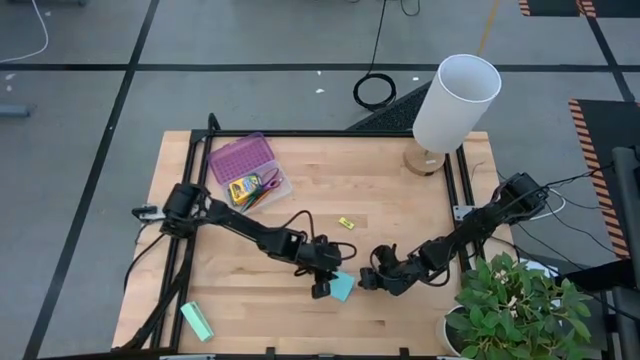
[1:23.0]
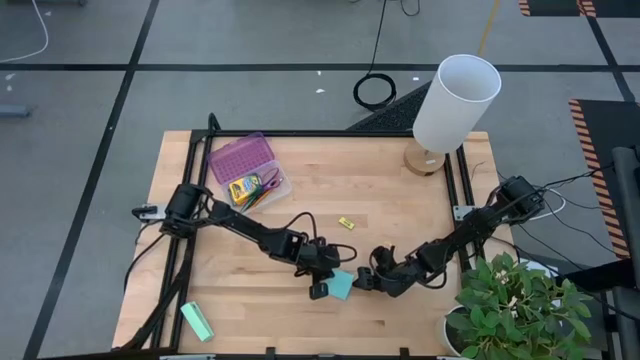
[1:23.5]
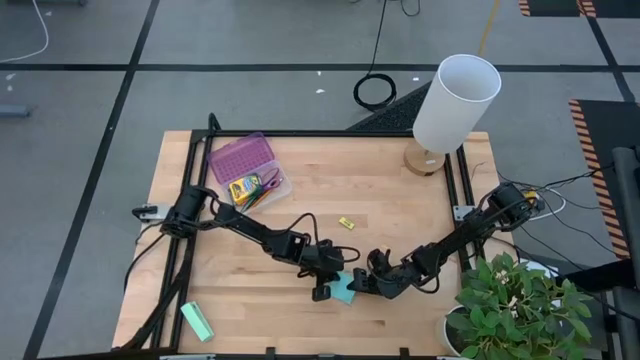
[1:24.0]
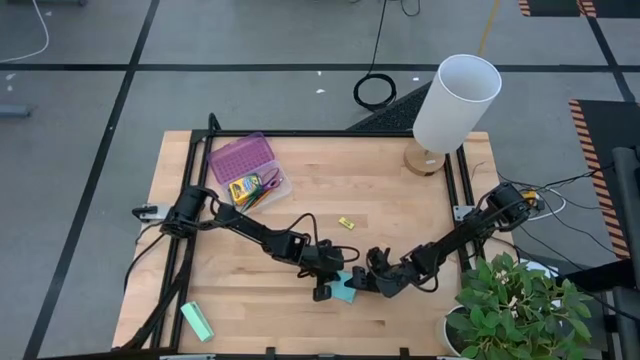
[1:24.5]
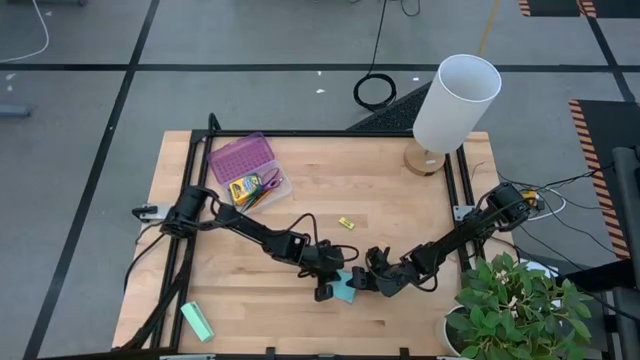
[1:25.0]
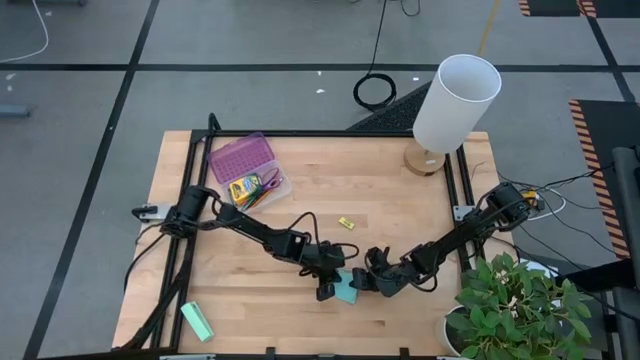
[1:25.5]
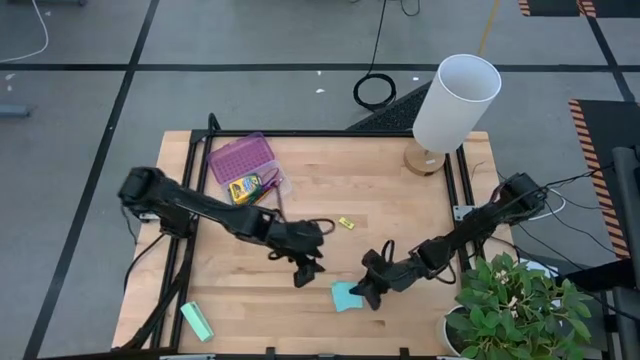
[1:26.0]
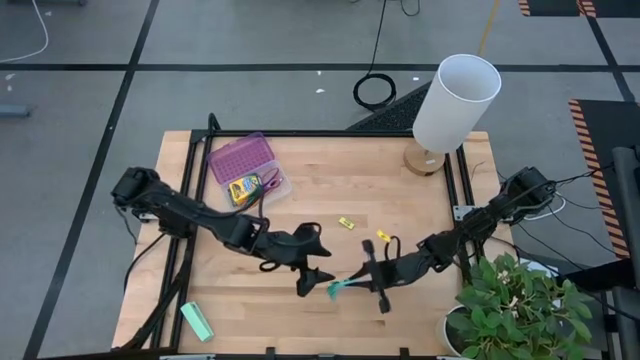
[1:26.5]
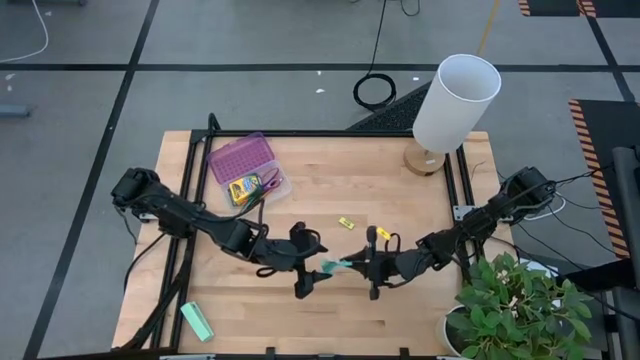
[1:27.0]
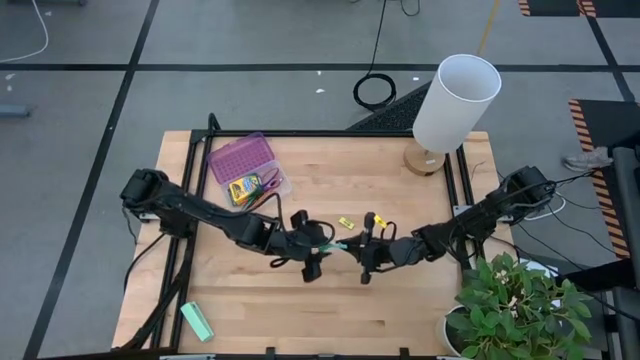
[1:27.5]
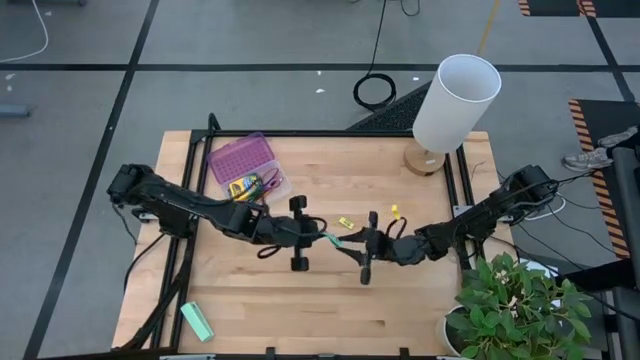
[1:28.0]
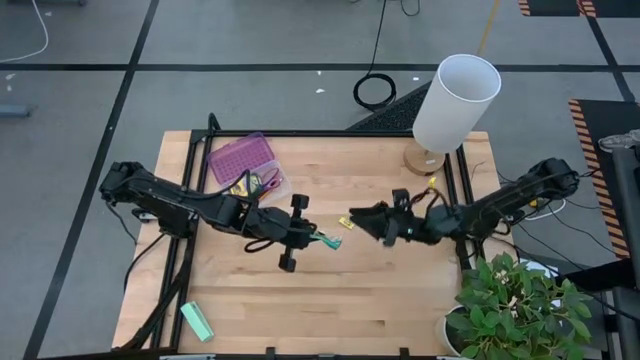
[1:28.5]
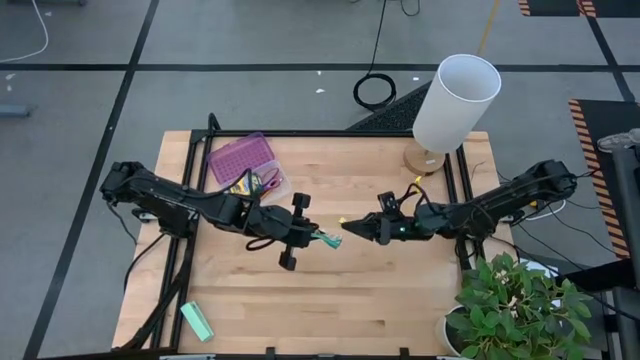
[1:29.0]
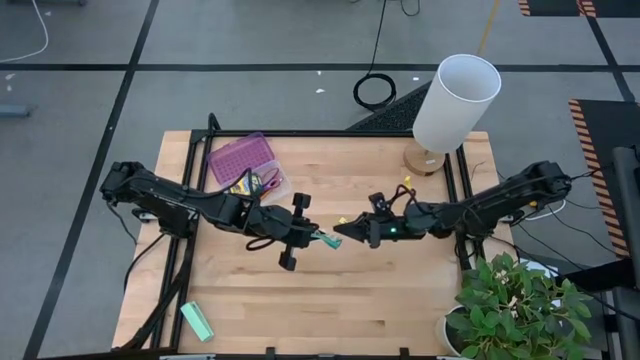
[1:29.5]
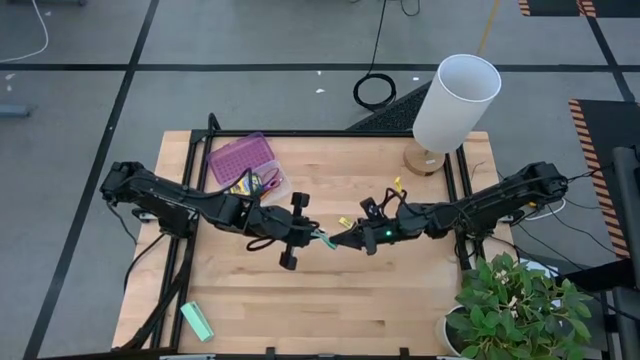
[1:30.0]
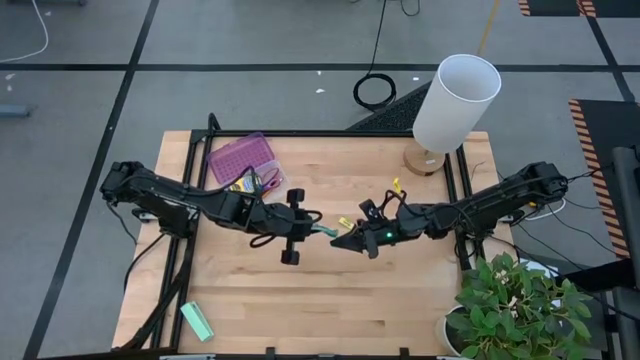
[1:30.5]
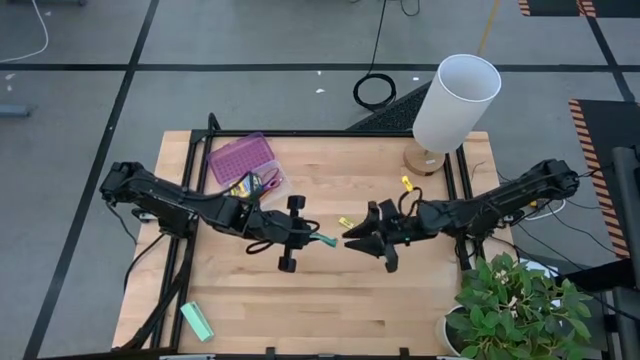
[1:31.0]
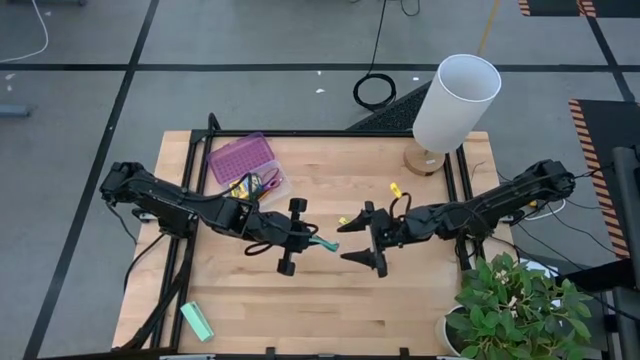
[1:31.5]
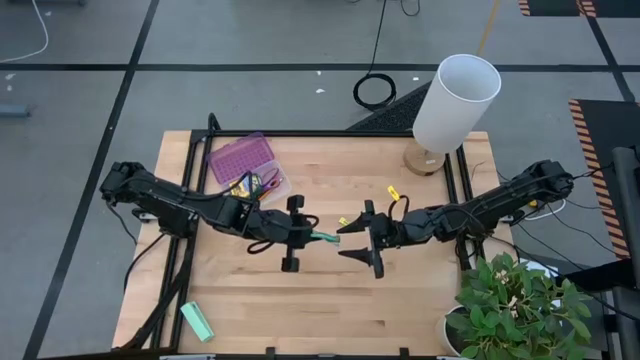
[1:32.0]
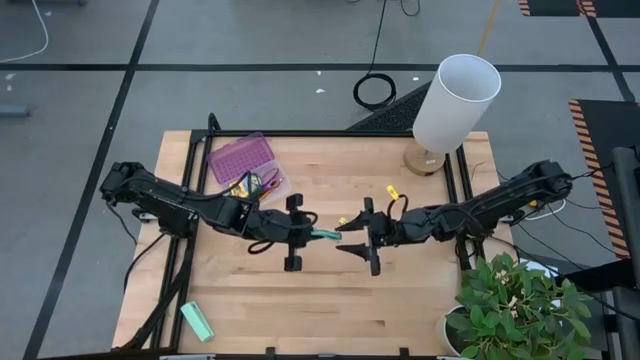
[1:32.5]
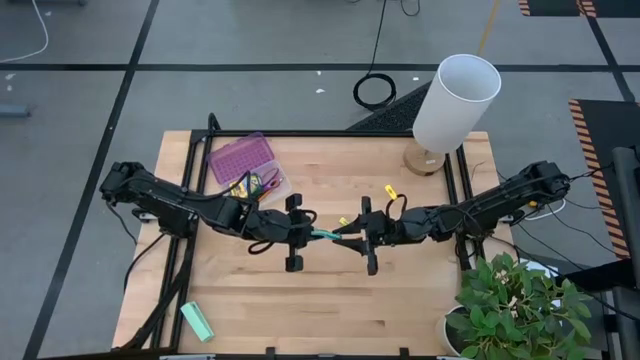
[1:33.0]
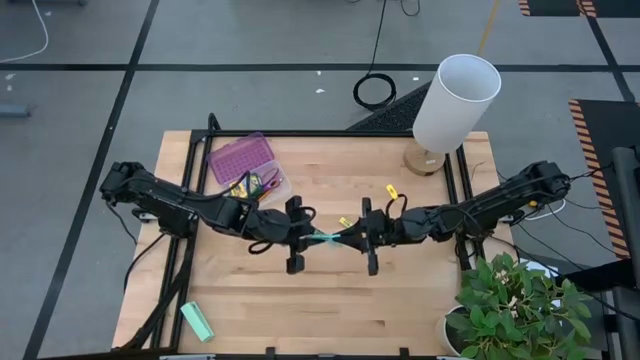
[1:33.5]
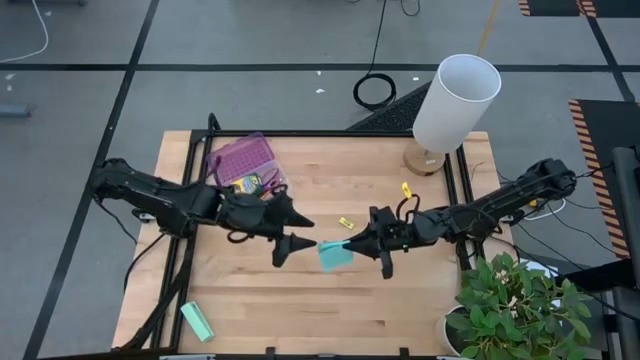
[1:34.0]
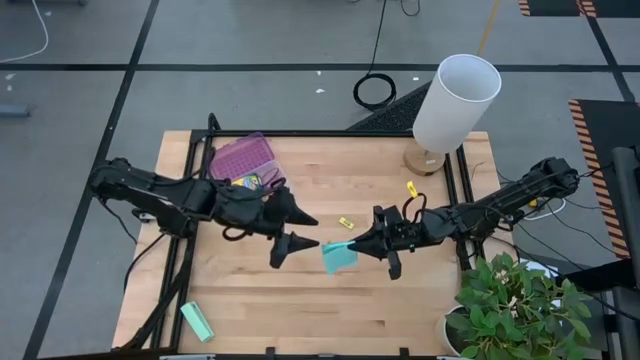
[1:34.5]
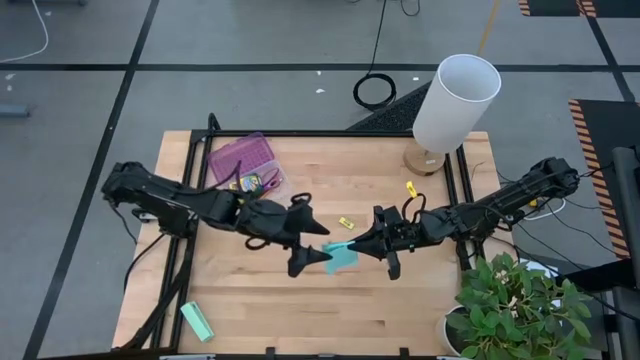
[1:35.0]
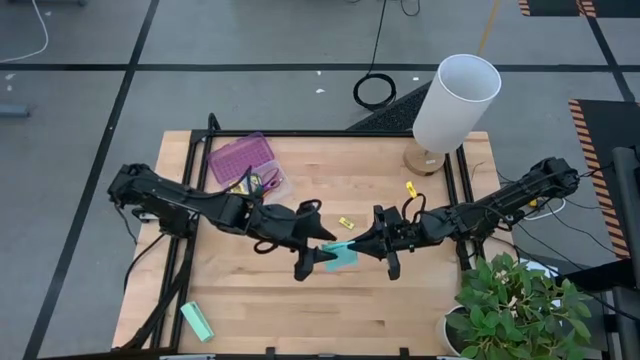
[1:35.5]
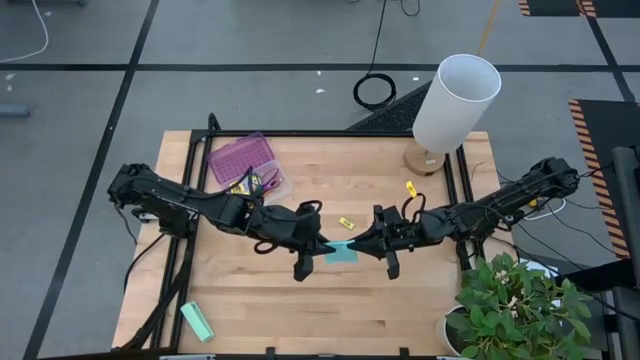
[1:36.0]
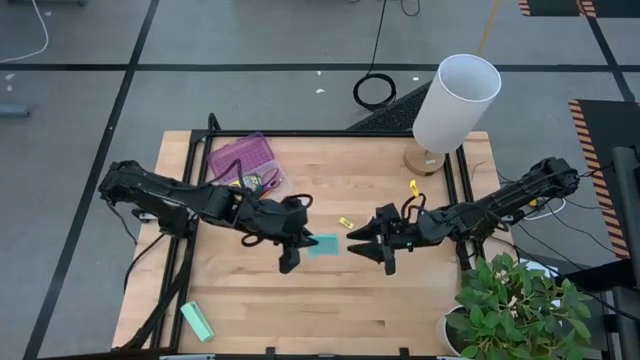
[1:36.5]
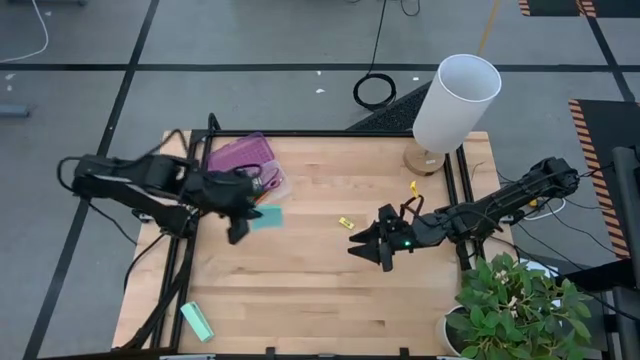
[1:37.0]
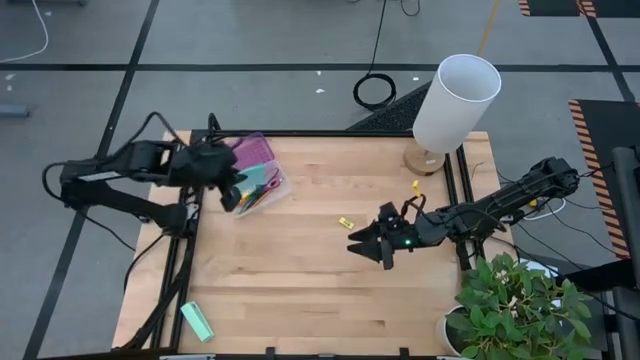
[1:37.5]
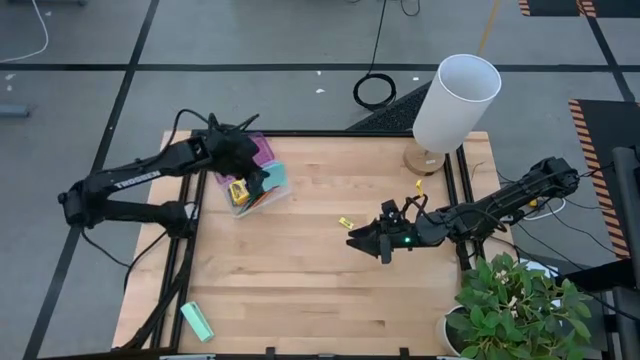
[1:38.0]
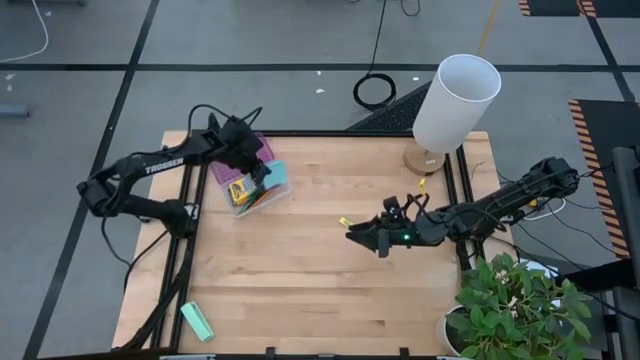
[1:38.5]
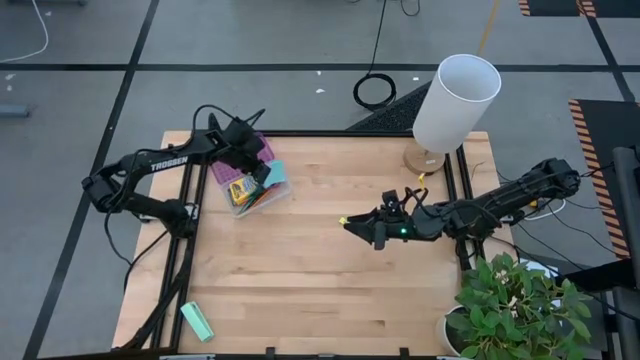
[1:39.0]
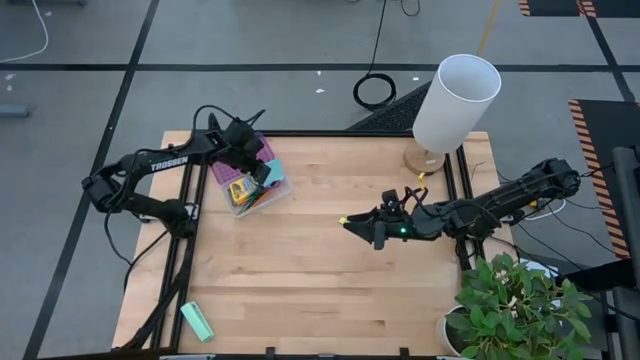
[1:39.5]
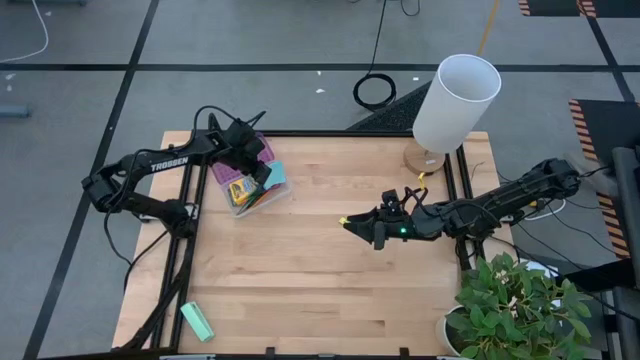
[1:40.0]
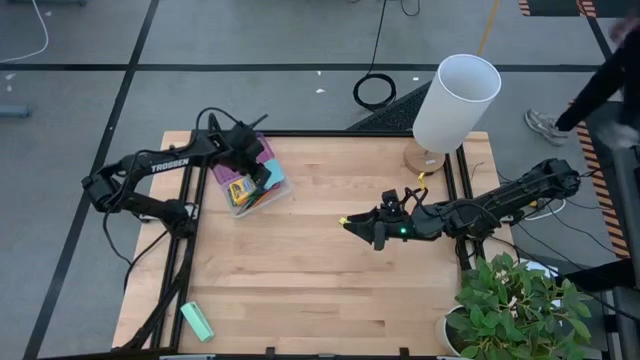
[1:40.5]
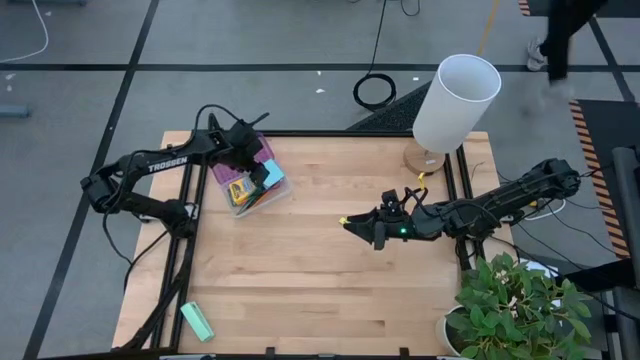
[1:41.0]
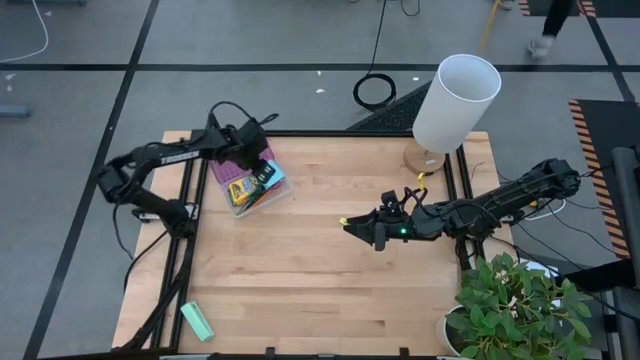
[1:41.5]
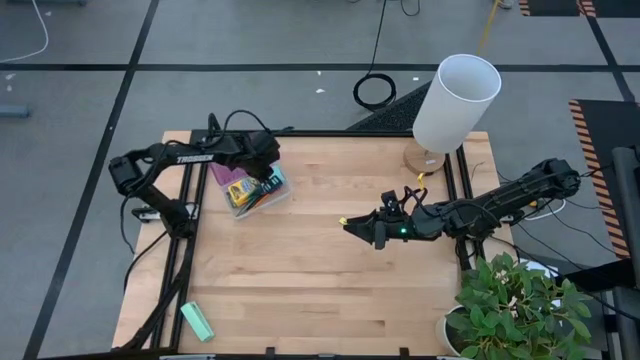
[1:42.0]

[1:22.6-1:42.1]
Task: Pack school essentials
Put the blue sticky notes into the supply box

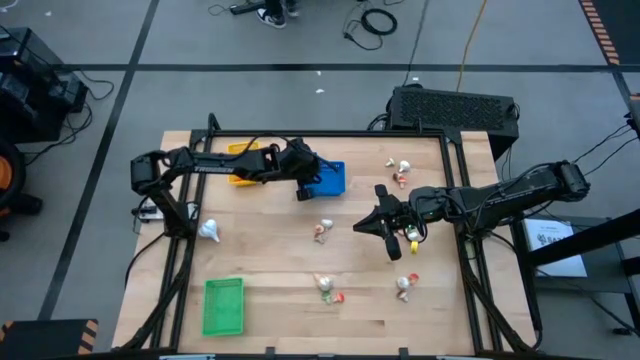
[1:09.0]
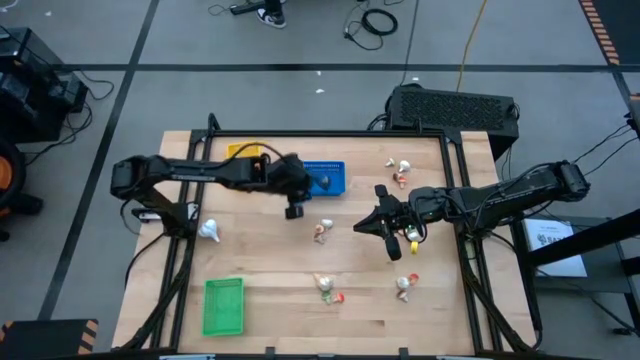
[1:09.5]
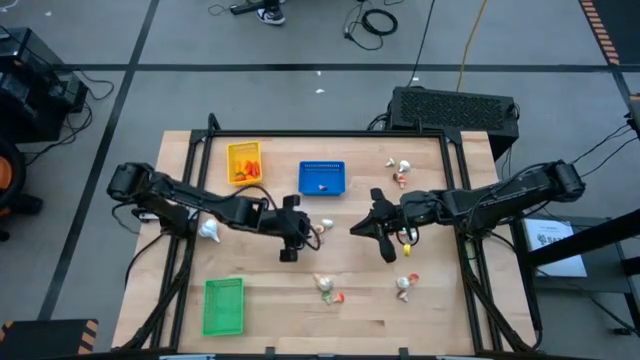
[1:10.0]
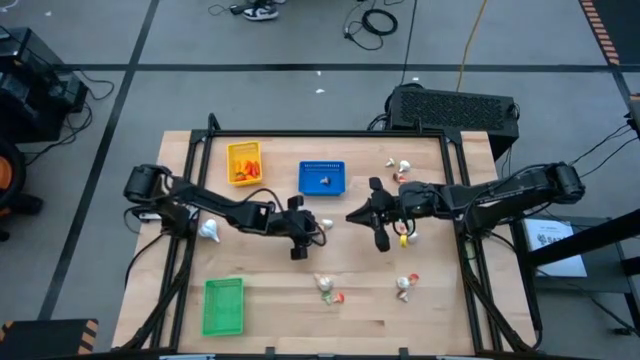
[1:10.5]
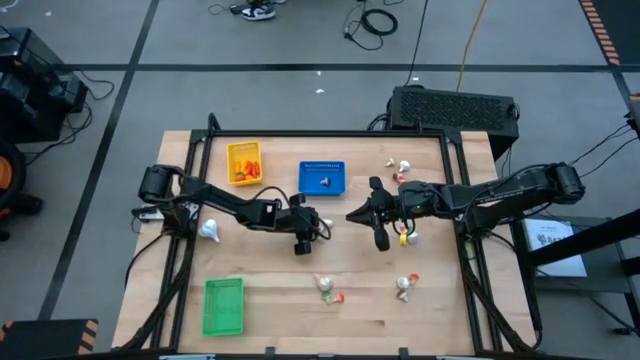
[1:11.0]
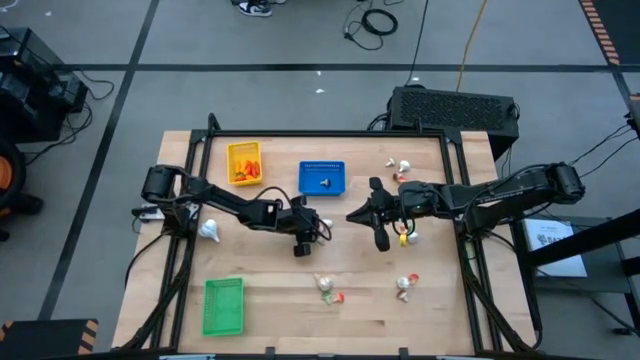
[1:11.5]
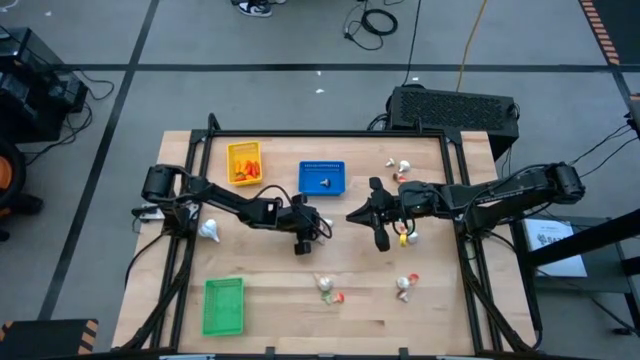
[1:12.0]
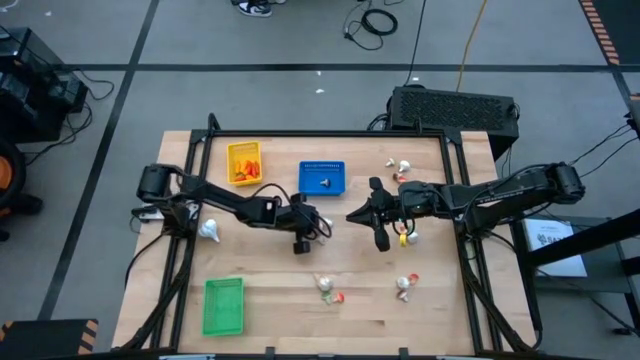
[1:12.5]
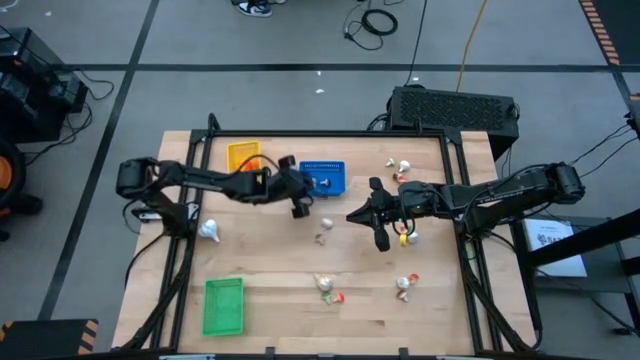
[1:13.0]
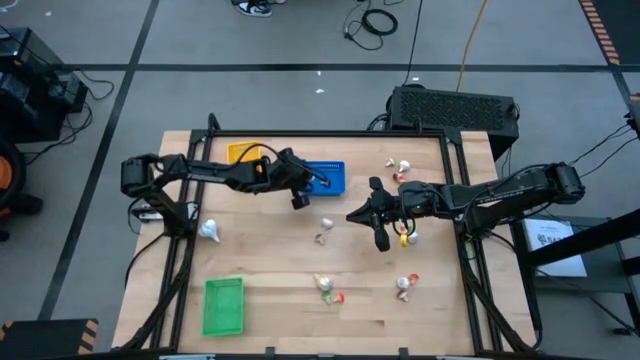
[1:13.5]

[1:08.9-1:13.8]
Task: Sort produce into baskets
Put the orange mushroom into the blue bin
